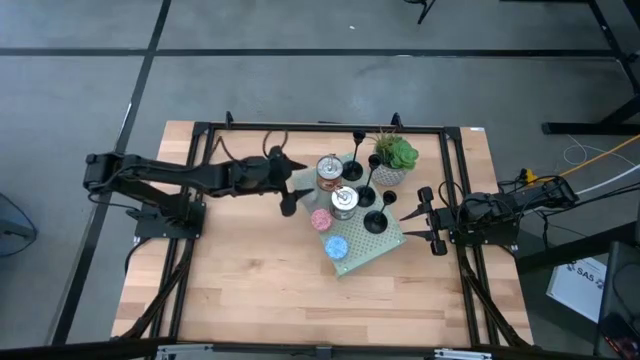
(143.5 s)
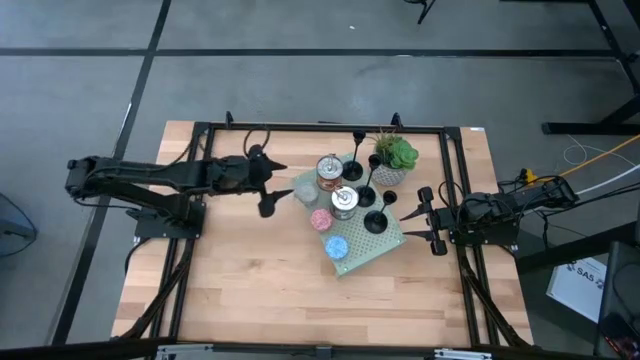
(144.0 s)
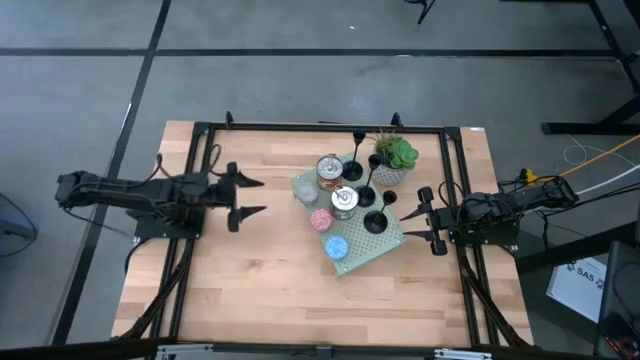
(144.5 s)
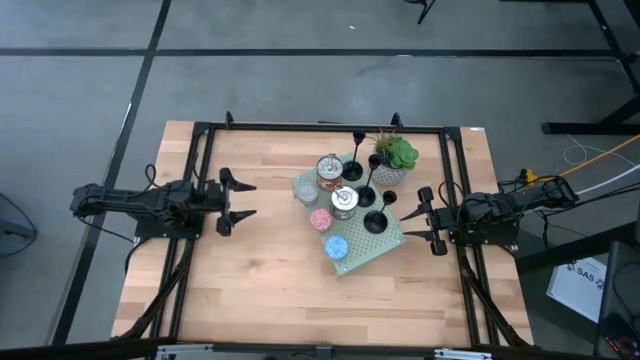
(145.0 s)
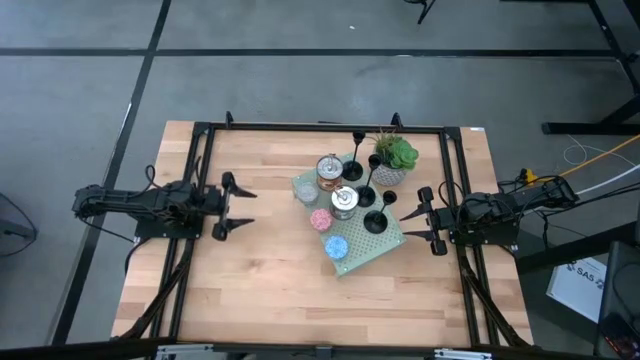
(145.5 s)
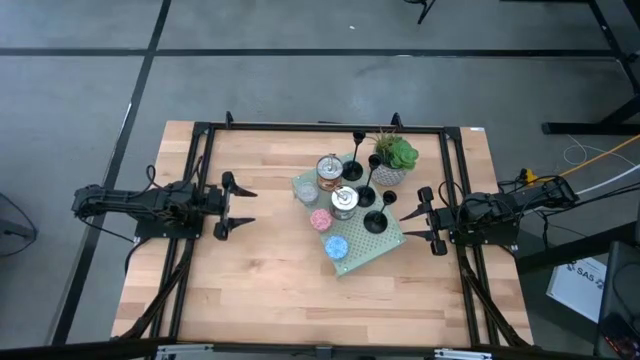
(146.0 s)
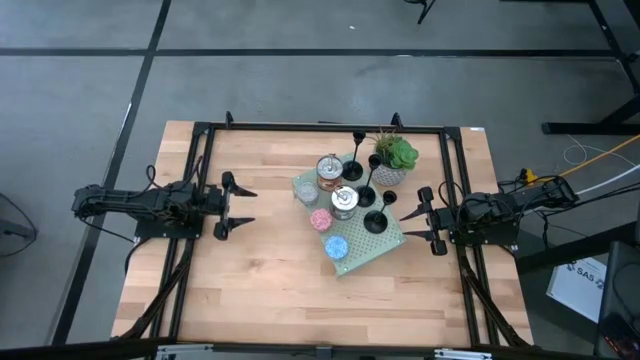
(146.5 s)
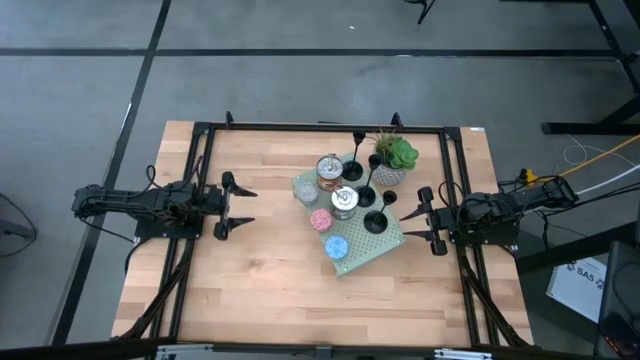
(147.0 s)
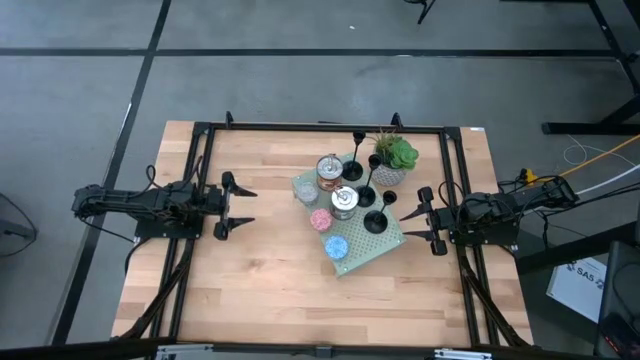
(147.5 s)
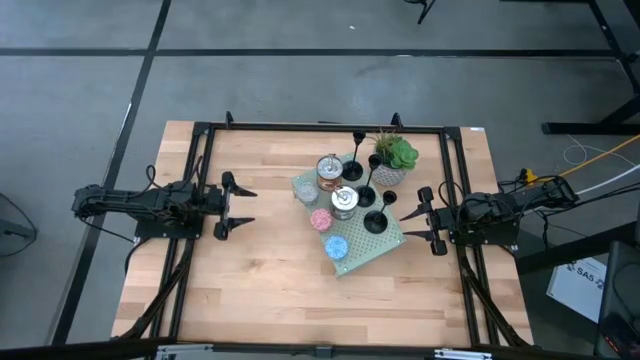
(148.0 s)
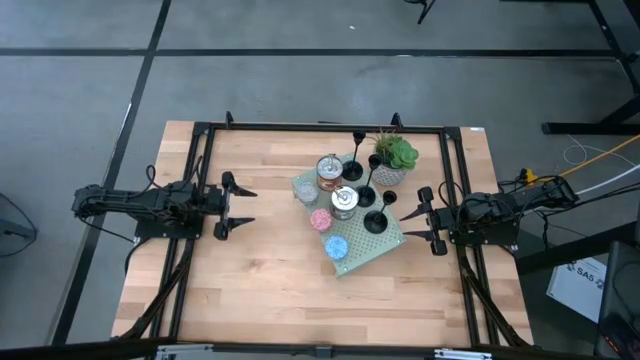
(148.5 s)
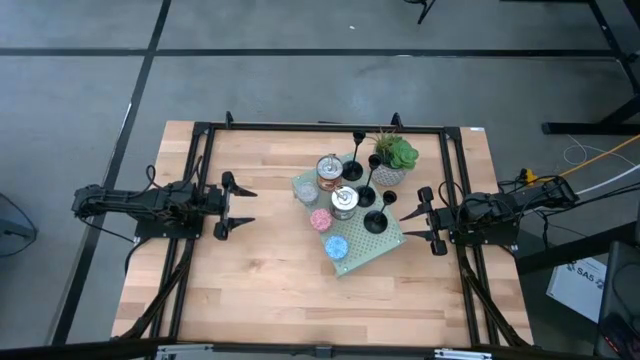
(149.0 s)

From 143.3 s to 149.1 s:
Task: Pick & Place candle stick holders
Return to Home Position

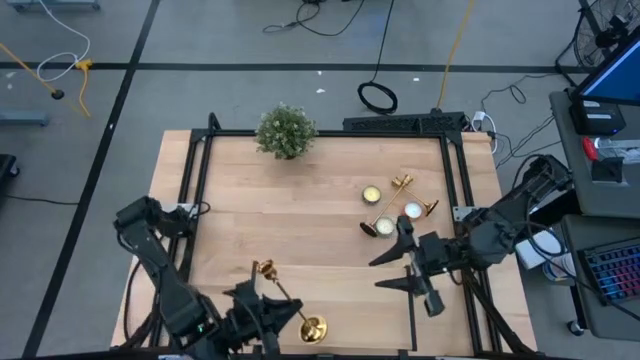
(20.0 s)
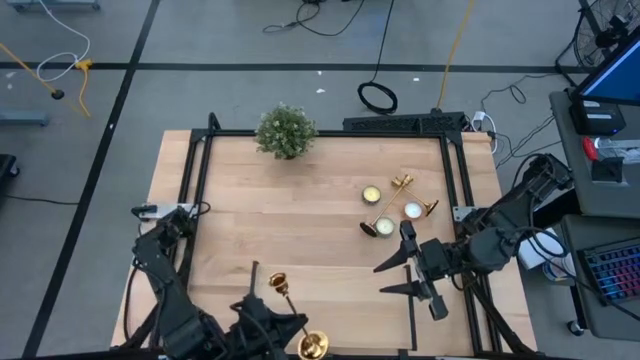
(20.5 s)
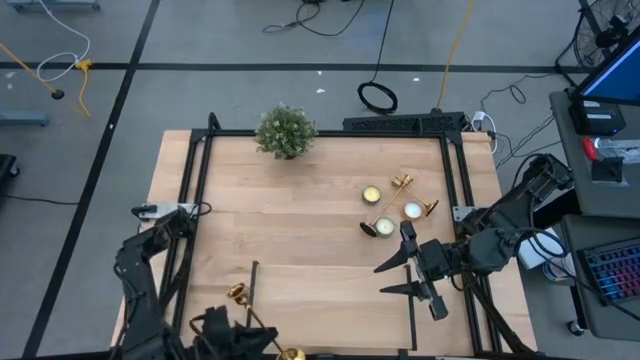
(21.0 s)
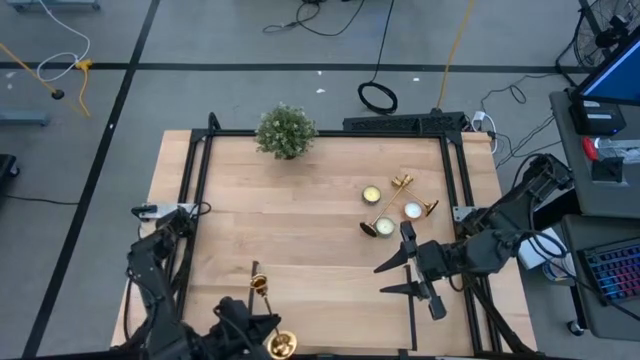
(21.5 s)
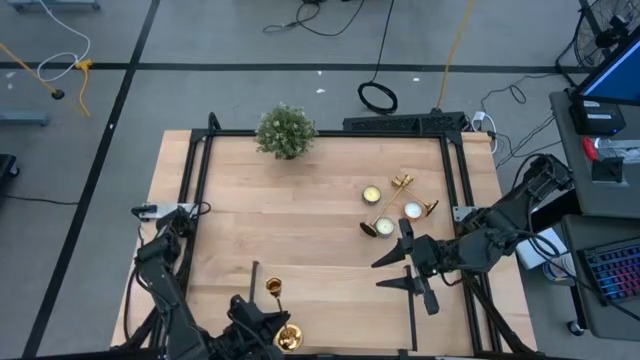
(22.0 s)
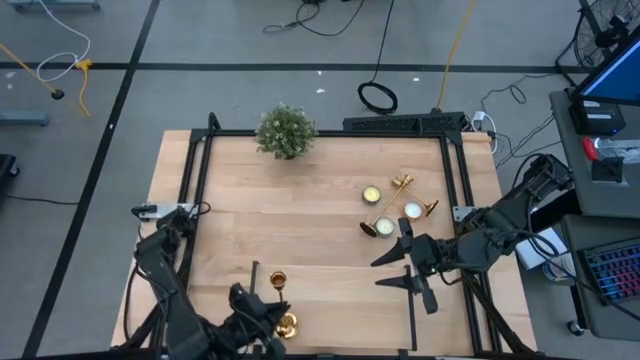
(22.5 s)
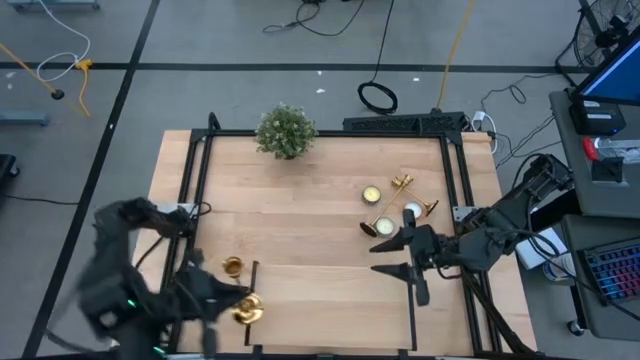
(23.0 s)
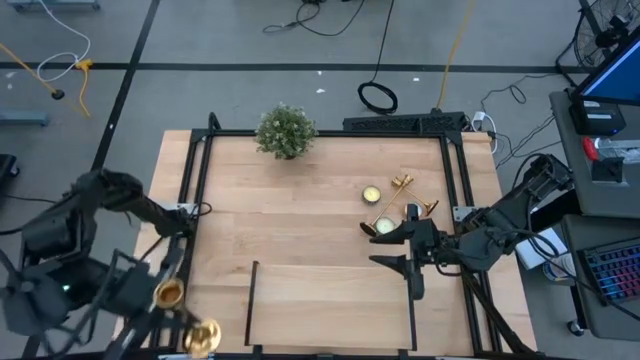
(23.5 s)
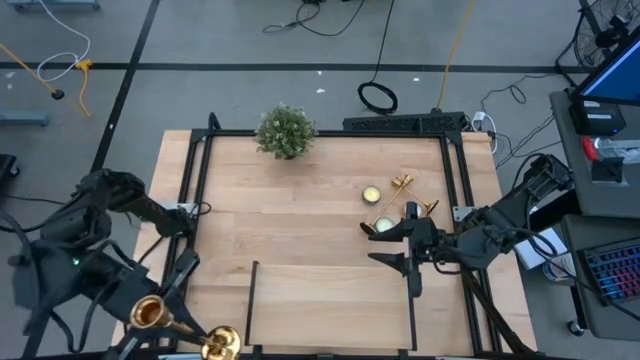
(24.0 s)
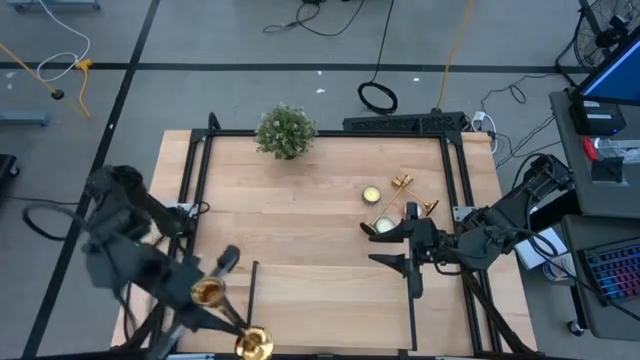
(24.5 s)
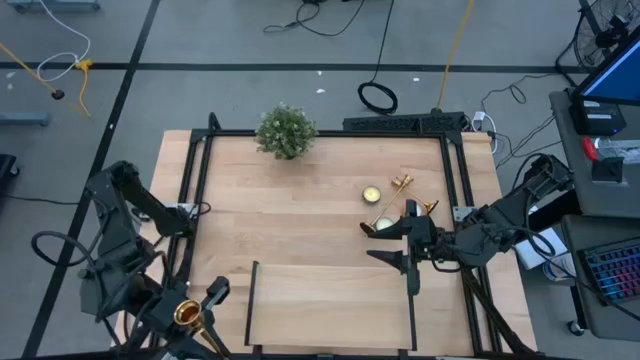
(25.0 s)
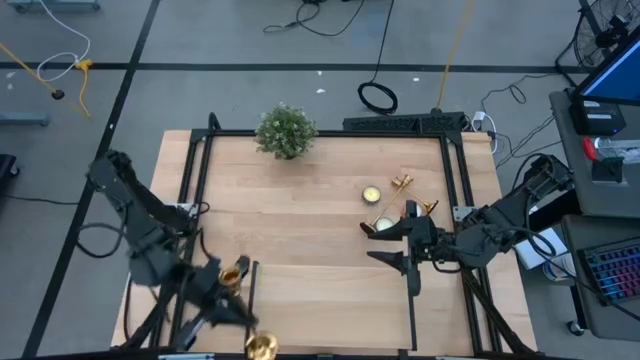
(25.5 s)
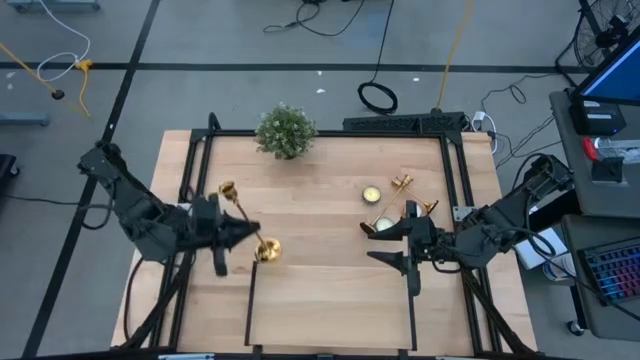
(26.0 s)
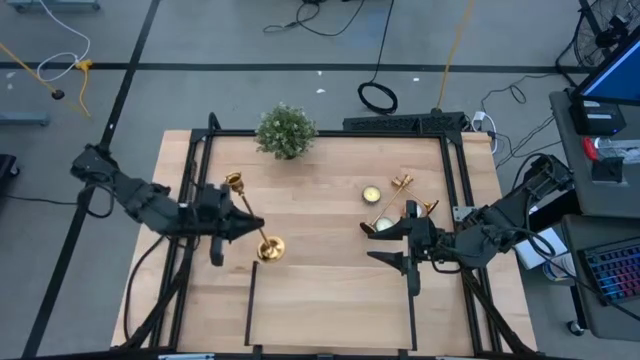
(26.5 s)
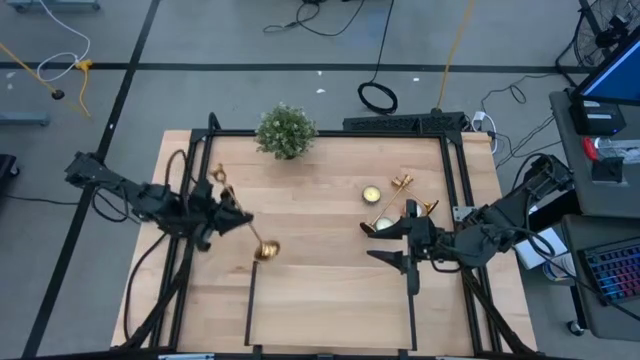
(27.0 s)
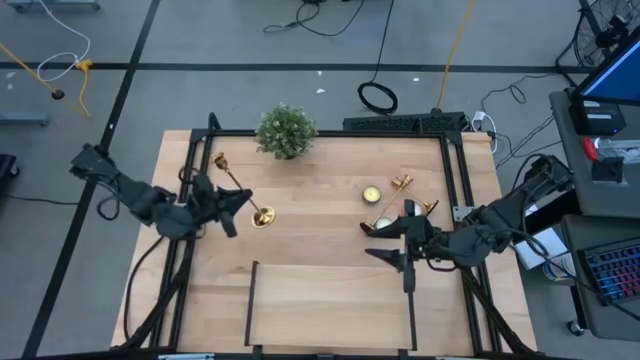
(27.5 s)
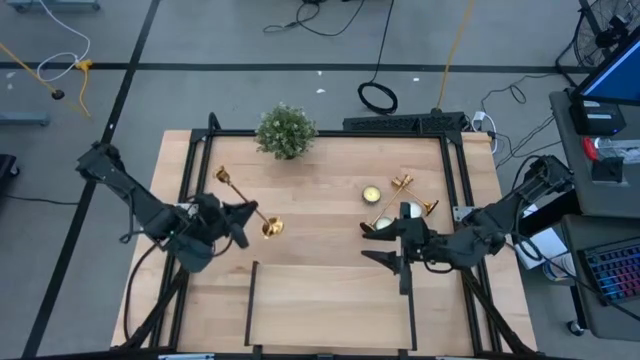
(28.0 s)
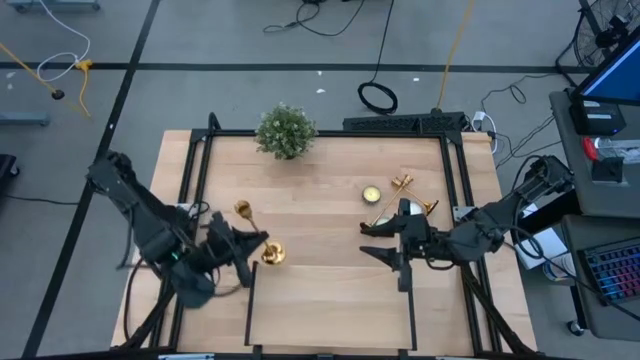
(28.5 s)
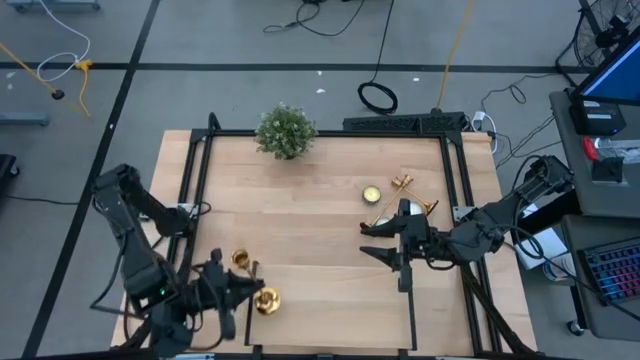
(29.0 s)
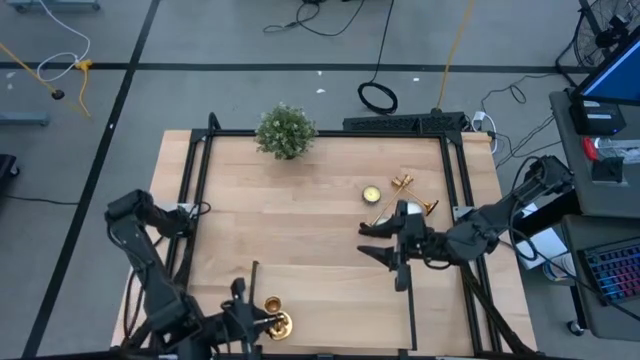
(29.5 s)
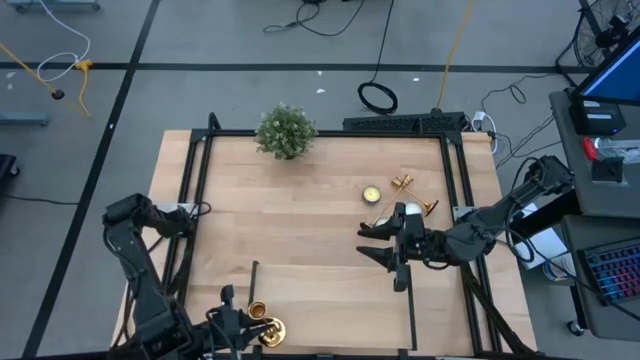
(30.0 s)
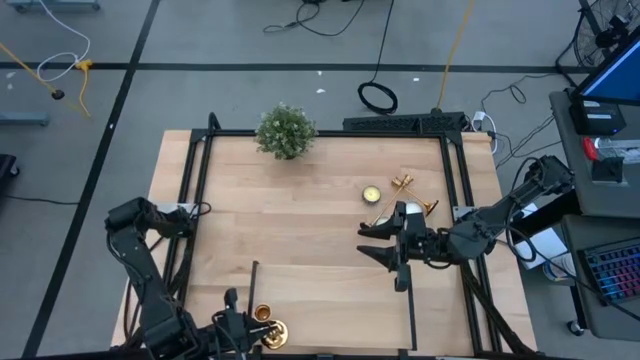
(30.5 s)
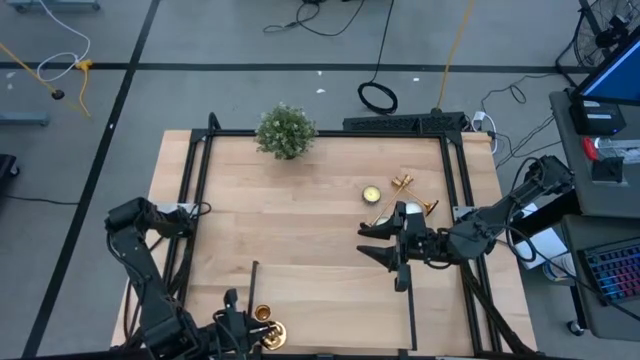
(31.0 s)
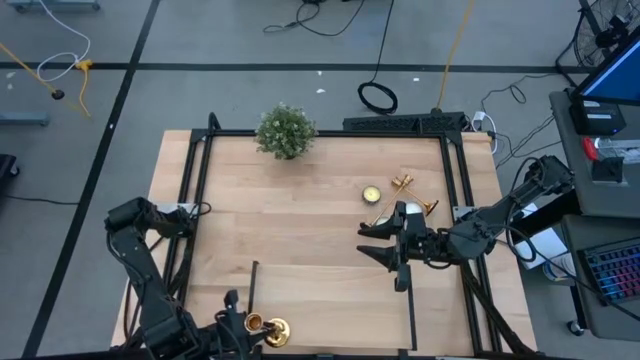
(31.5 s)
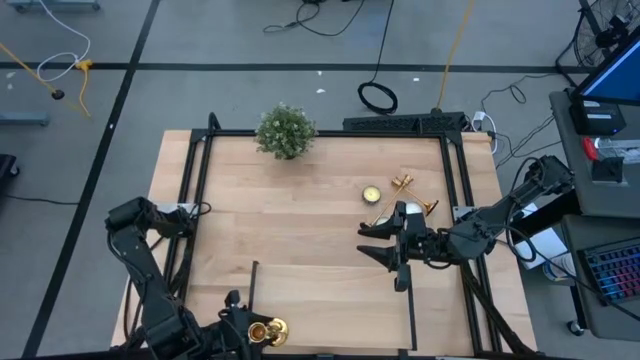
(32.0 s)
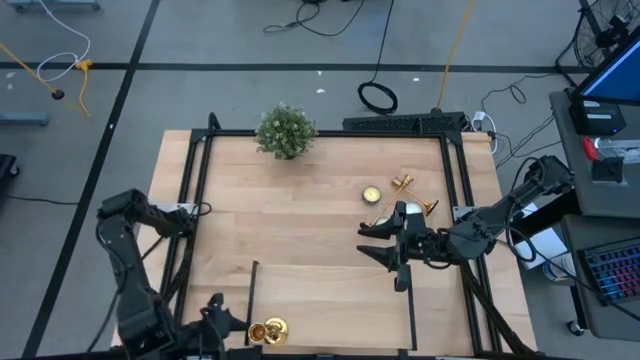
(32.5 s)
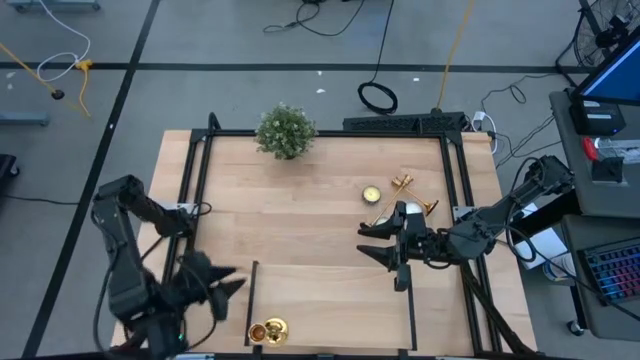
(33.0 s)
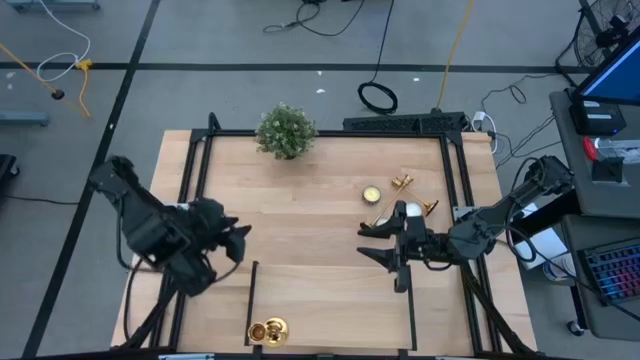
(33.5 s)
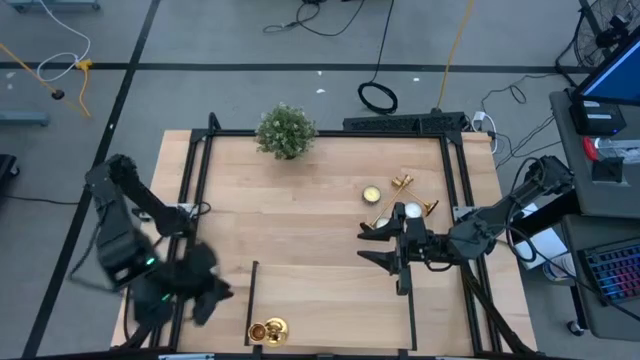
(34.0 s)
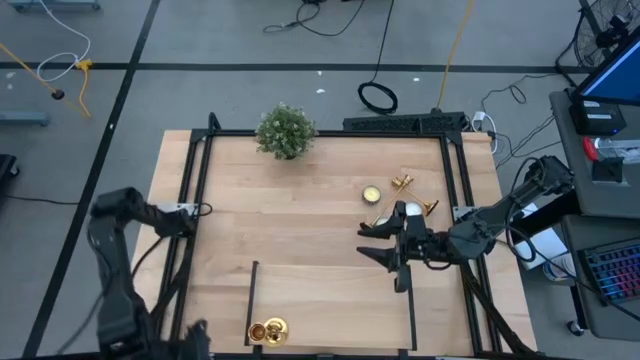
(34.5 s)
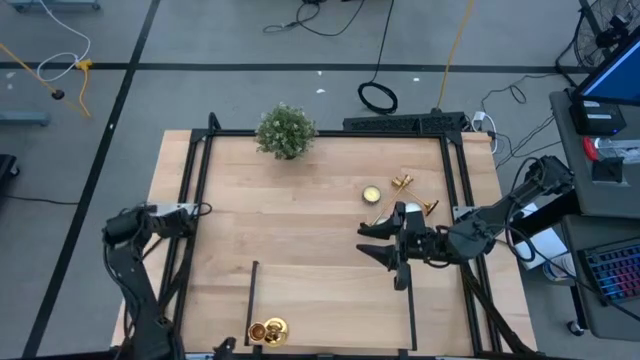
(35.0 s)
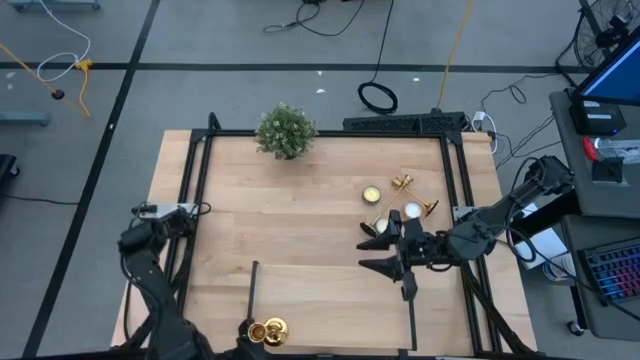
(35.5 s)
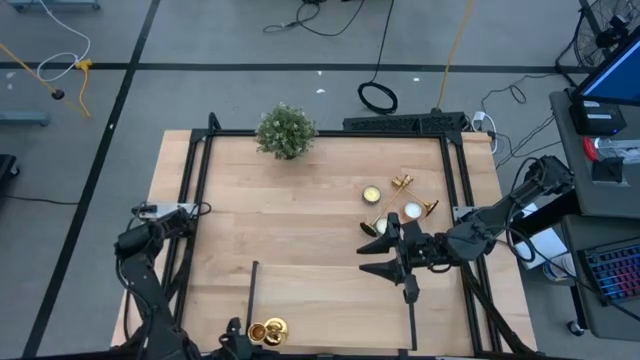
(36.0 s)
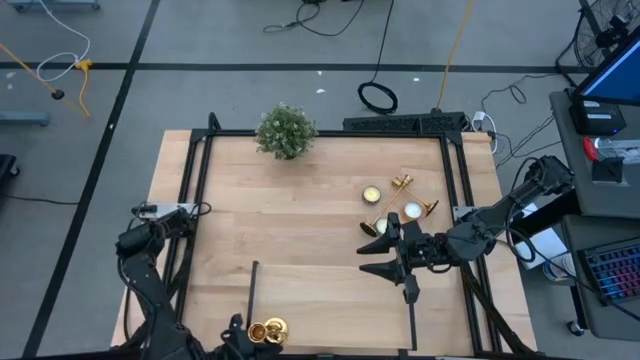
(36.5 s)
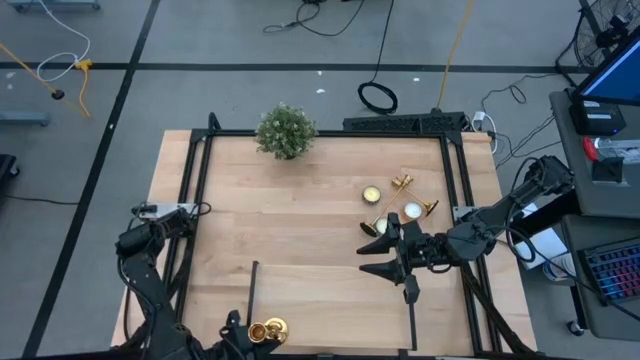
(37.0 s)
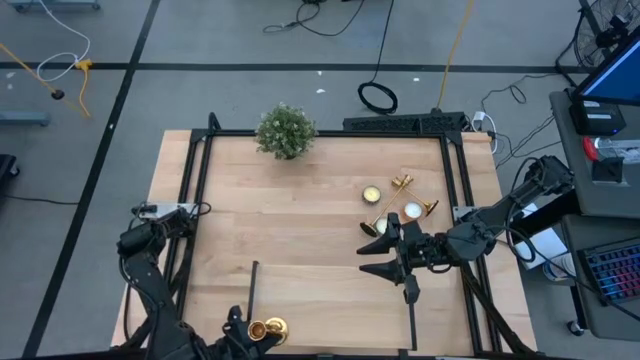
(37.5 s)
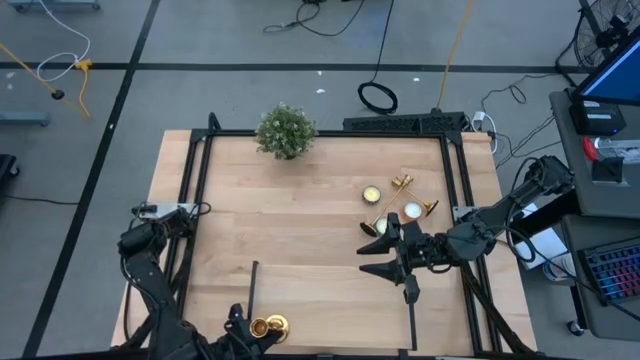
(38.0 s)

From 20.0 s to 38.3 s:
Task: Pick & Place candle stick holders
Put the left gold candle holder on the shelf
